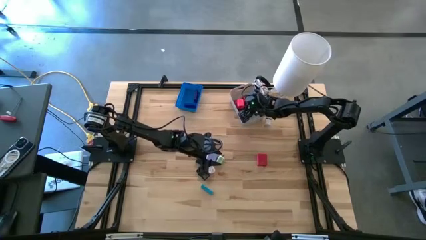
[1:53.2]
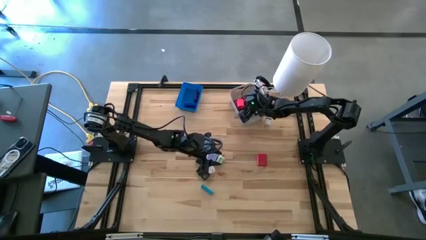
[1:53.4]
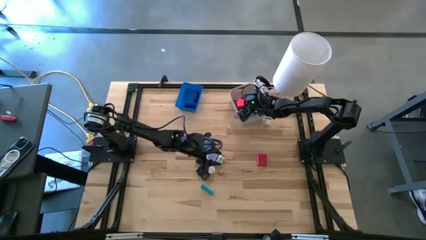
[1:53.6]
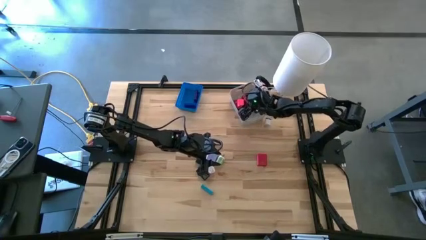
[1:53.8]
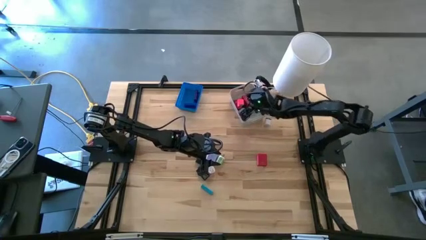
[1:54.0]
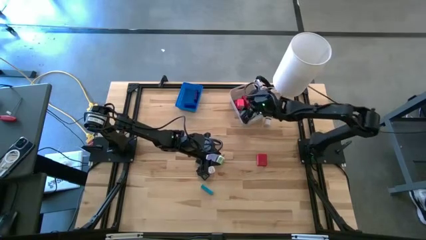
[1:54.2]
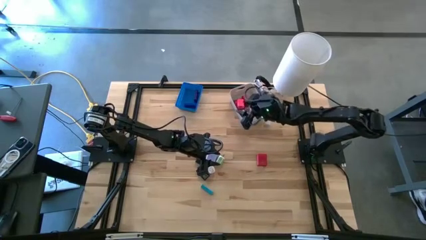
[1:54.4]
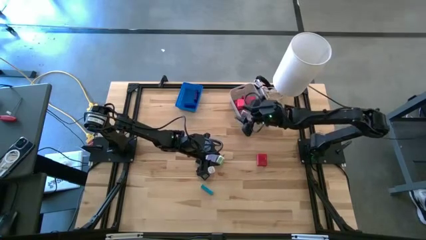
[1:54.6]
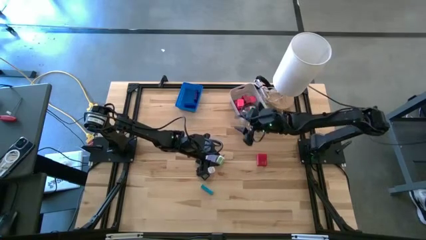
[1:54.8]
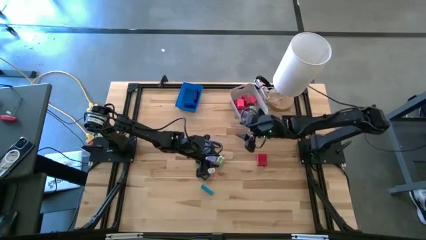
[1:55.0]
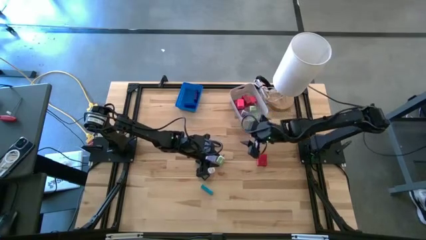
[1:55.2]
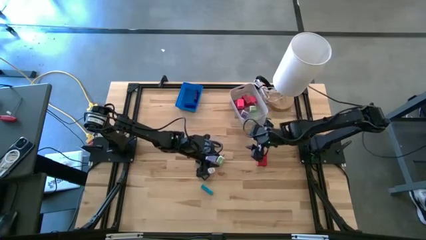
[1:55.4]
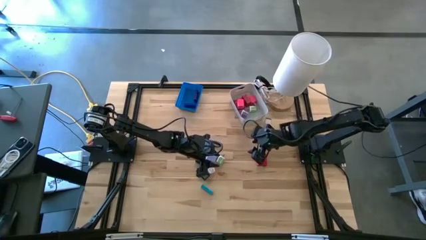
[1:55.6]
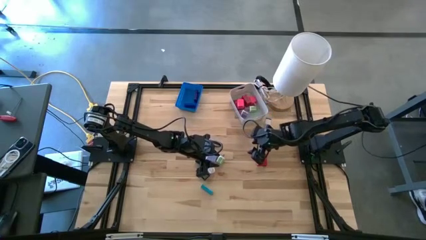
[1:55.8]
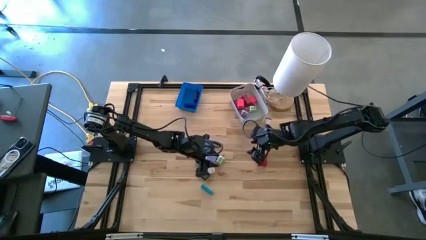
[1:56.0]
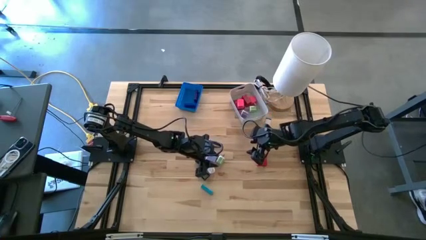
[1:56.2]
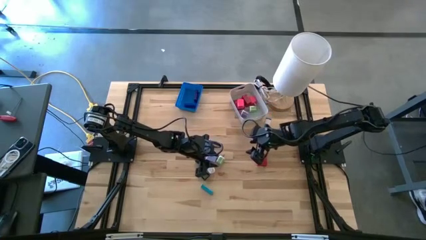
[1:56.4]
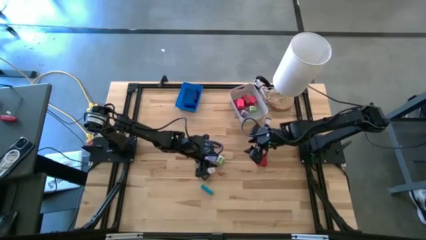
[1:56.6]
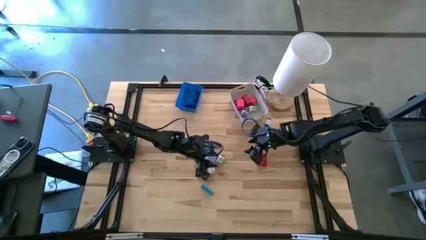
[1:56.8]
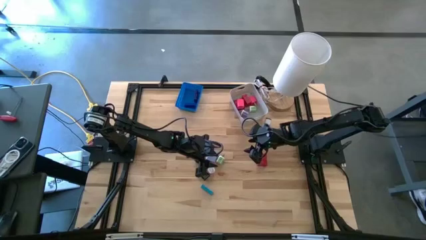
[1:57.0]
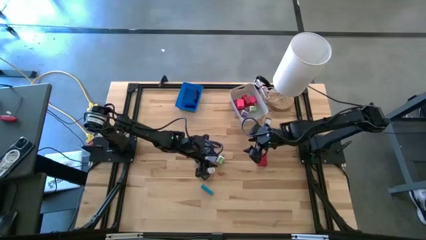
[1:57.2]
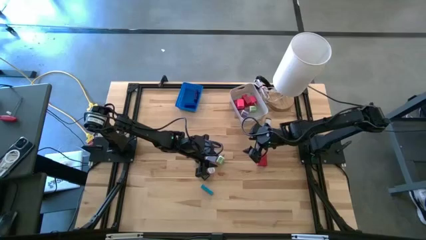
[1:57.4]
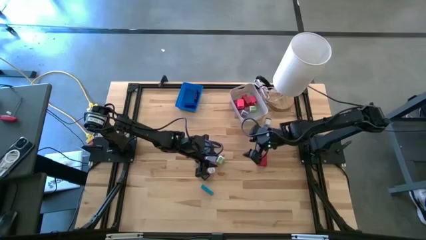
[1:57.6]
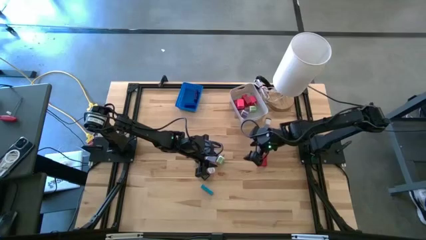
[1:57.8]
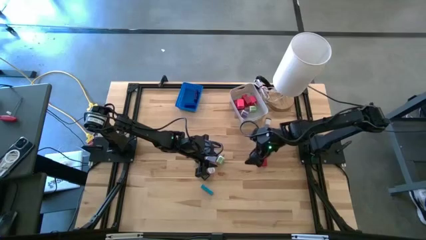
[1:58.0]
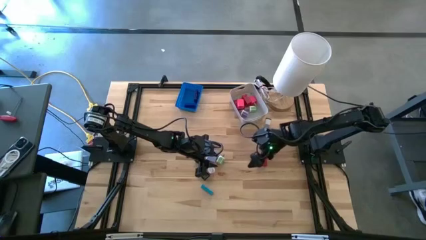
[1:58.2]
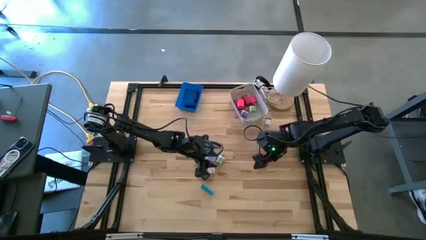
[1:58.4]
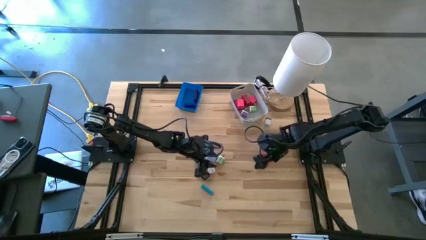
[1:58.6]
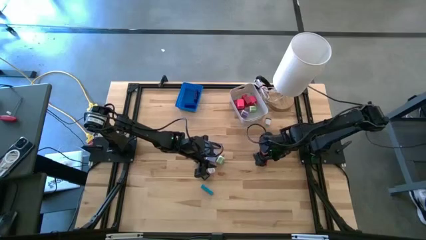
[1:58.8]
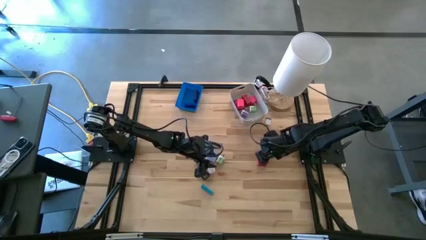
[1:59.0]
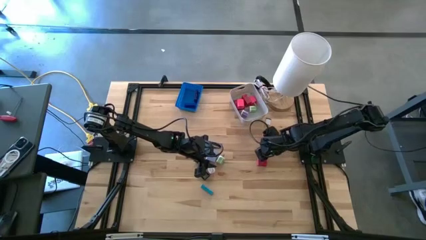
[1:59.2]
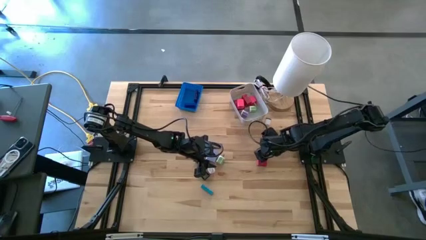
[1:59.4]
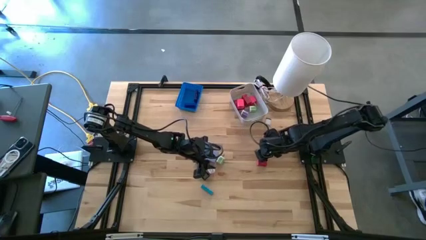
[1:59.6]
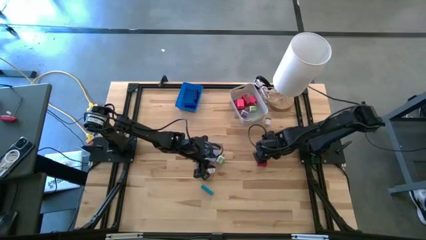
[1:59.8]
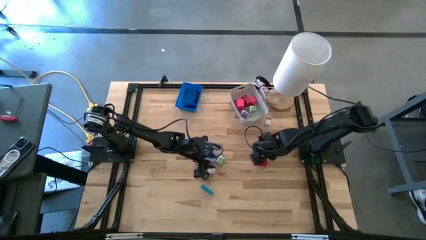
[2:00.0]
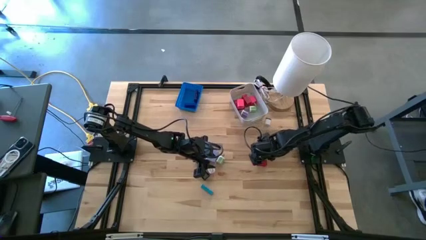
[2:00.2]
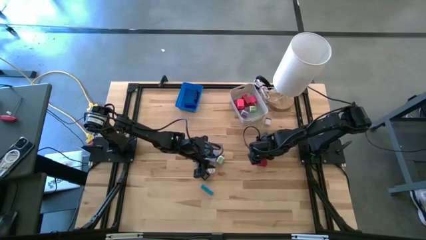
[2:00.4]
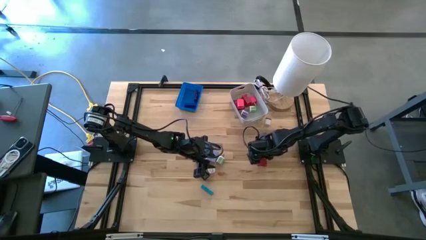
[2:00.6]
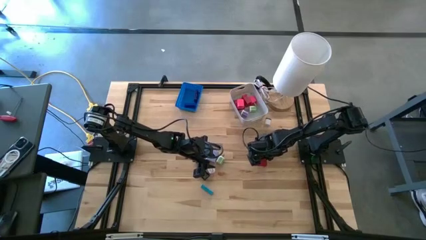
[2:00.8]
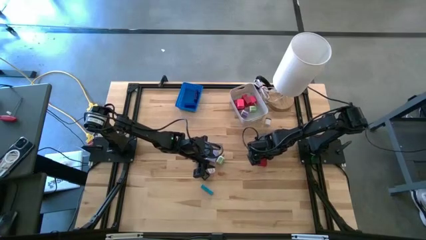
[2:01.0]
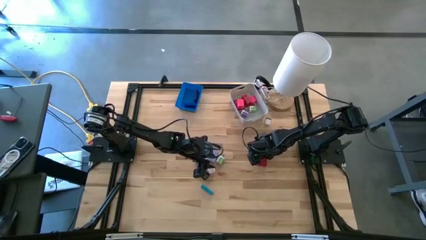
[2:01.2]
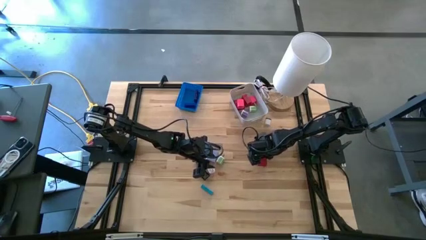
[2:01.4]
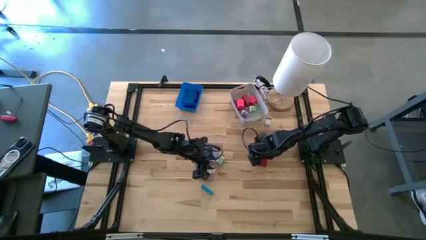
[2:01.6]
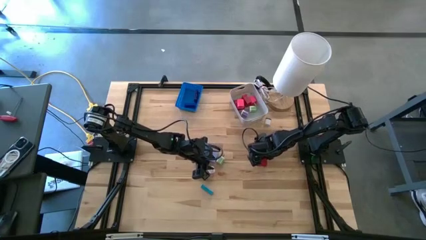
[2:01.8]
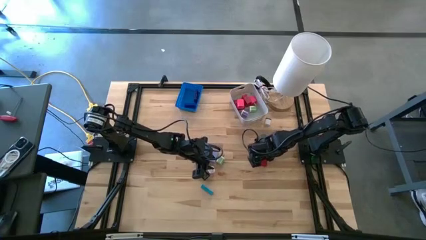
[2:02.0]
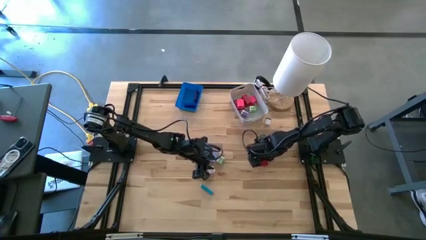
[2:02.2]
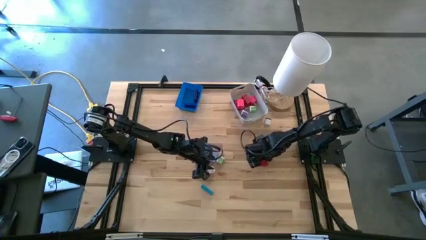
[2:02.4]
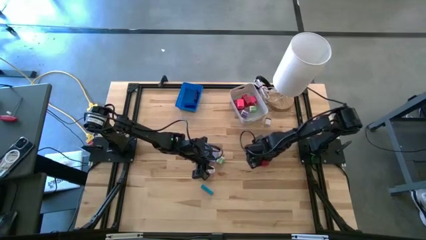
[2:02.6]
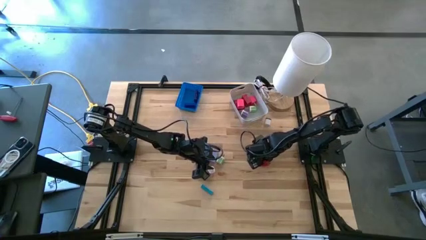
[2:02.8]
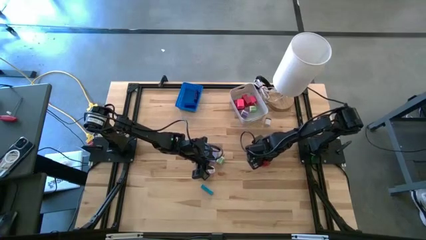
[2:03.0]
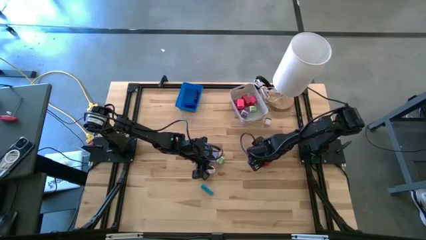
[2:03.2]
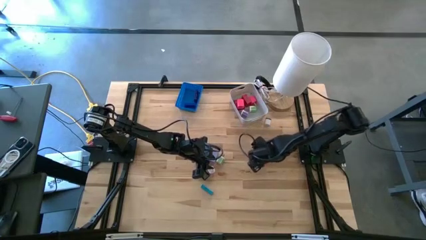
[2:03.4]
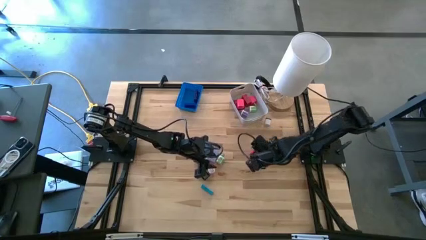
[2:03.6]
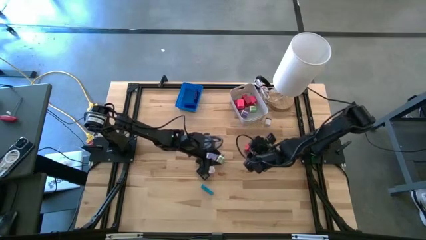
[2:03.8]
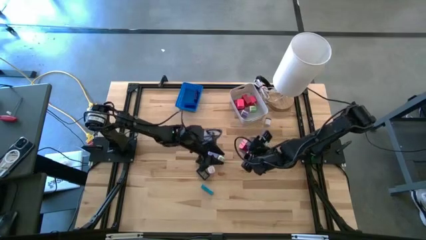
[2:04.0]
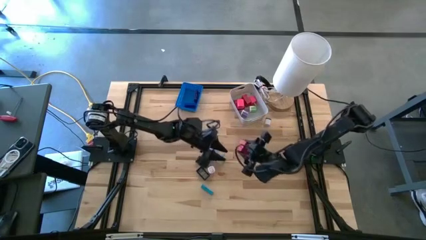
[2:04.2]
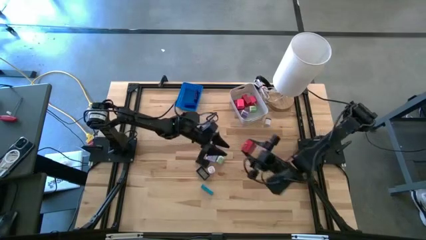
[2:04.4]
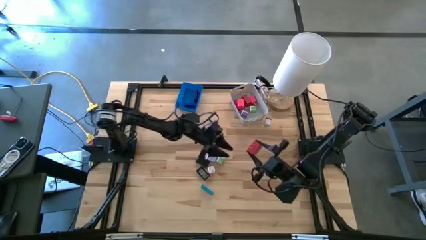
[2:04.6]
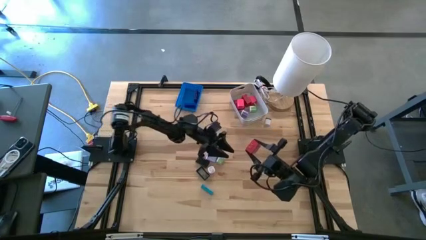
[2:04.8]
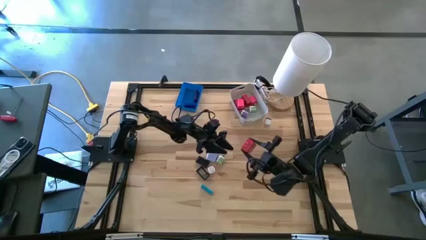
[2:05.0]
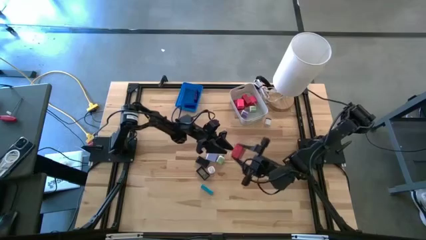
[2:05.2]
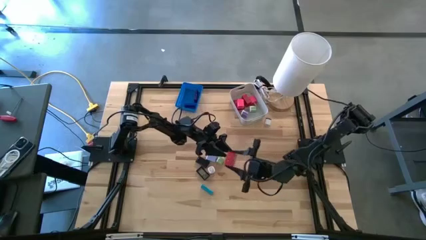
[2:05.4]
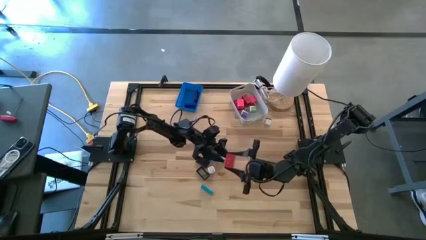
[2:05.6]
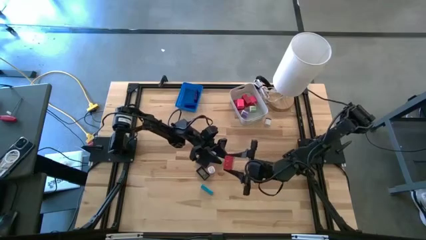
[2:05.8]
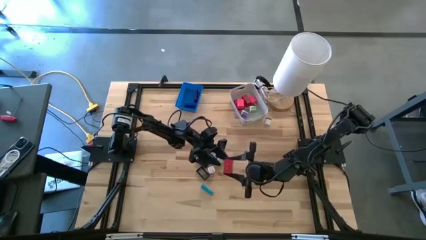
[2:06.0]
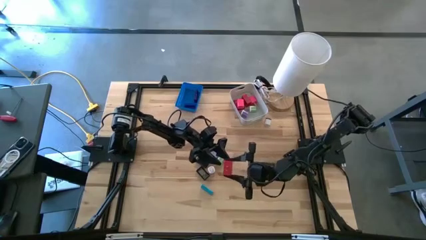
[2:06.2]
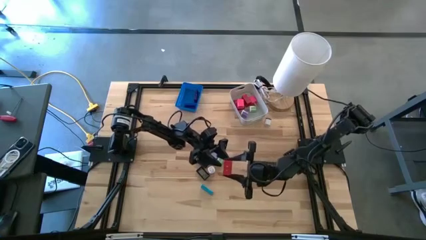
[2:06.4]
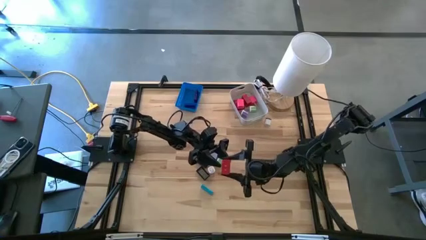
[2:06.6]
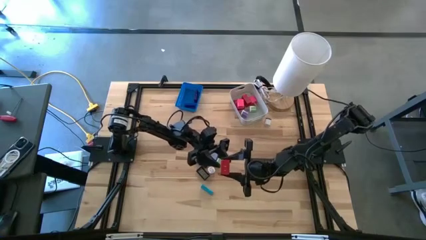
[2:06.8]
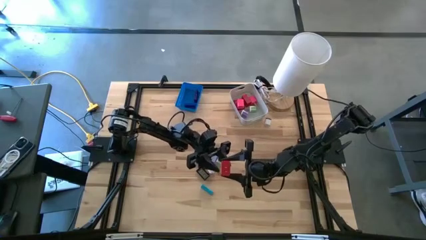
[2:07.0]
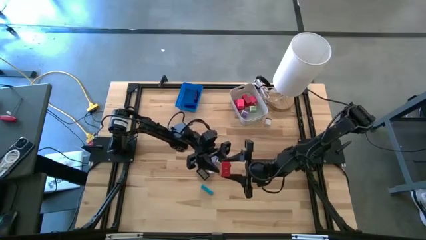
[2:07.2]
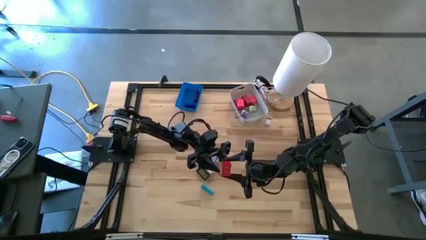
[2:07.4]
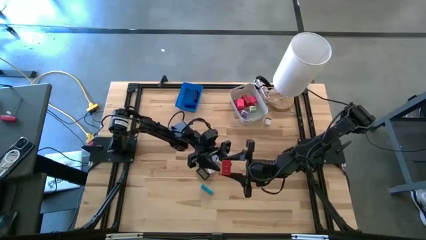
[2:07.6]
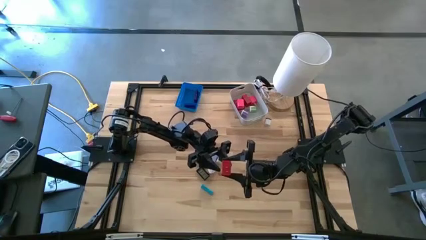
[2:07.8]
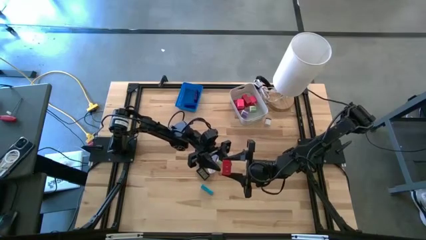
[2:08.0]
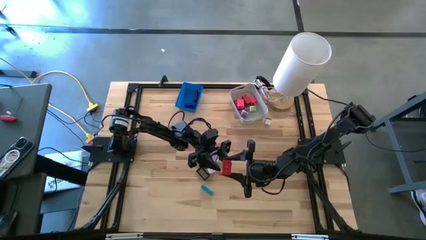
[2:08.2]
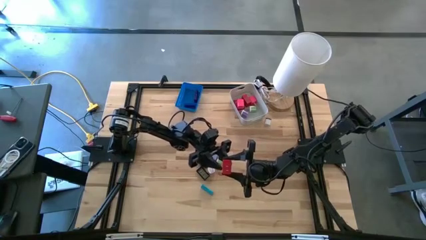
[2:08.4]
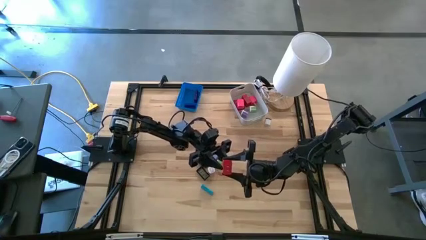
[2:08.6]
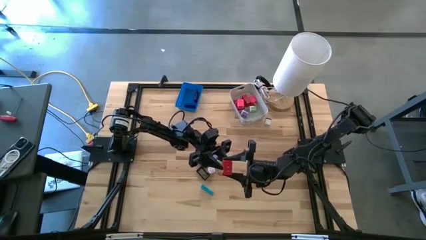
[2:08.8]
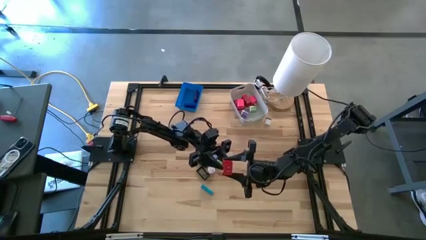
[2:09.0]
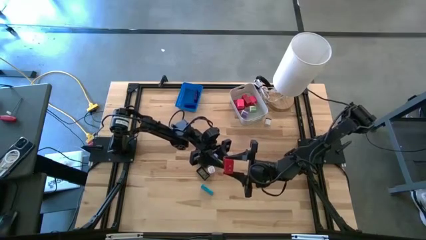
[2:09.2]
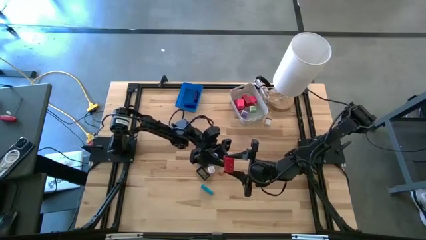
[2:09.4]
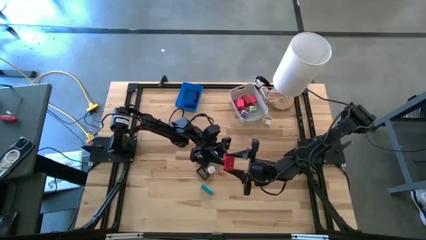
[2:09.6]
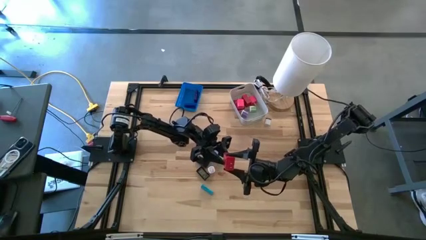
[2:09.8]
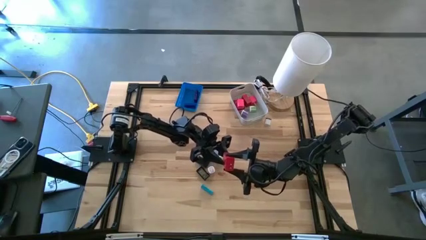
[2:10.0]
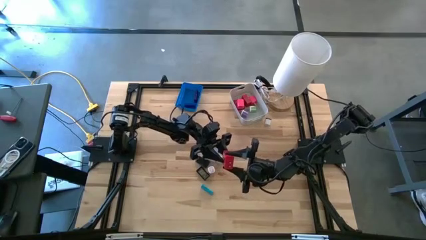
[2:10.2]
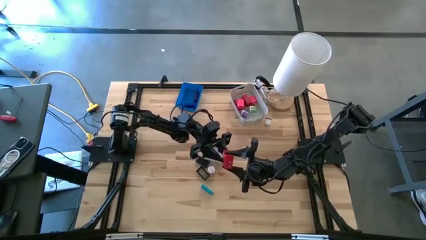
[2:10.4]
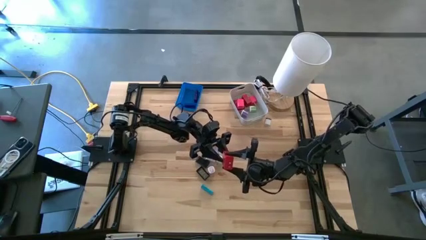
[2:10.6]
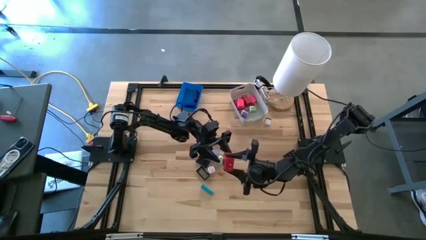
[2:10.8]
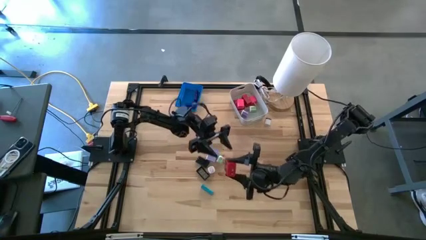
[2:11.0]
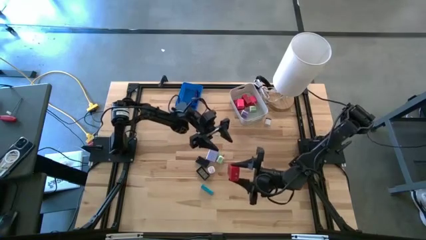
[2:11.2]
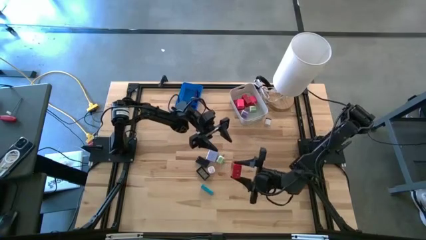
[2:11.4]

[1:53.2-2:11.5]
Task: Pick & Place Office items
Put the red charger adapter into the white bin
